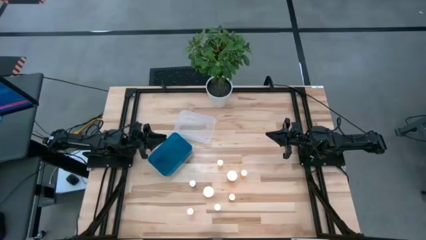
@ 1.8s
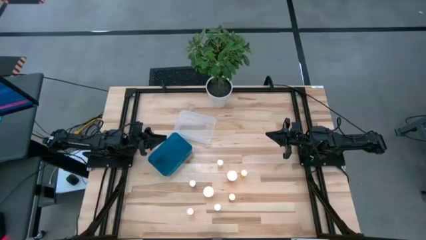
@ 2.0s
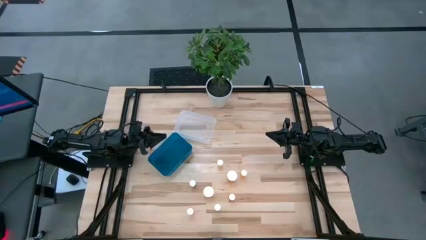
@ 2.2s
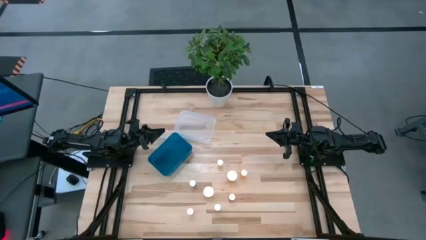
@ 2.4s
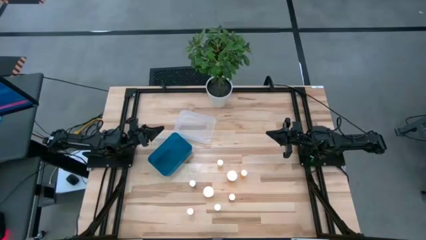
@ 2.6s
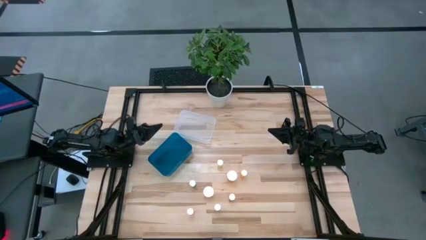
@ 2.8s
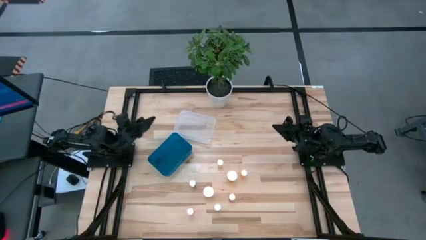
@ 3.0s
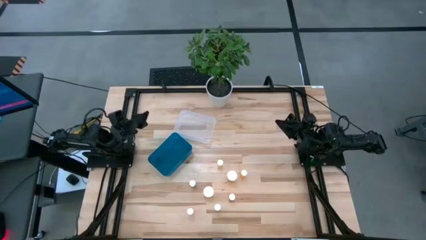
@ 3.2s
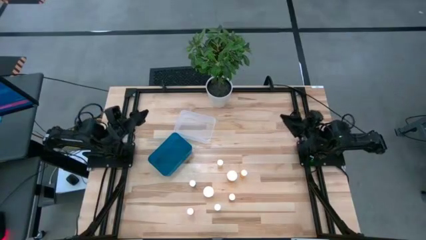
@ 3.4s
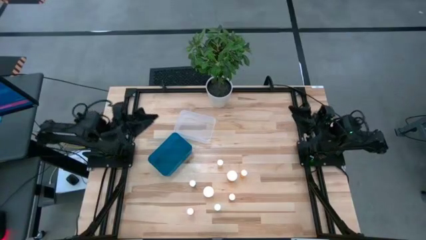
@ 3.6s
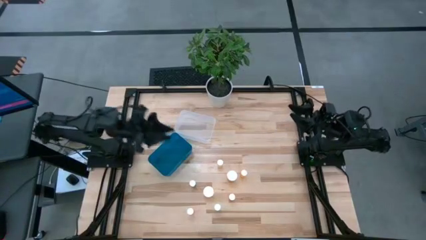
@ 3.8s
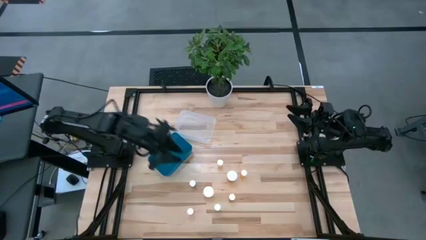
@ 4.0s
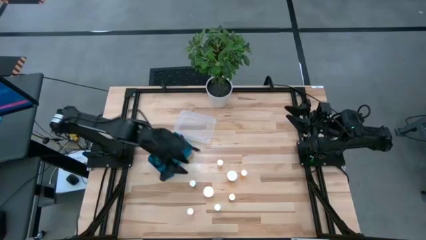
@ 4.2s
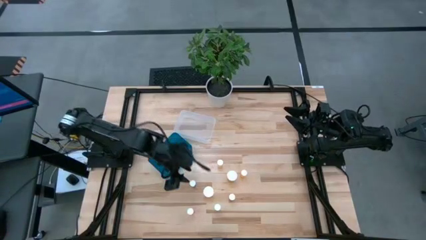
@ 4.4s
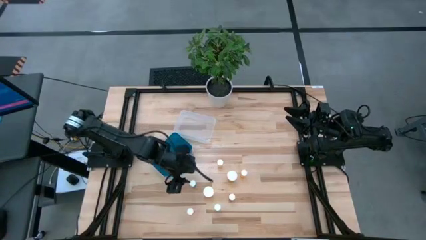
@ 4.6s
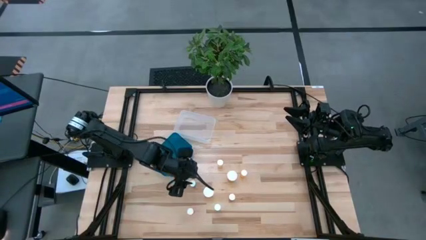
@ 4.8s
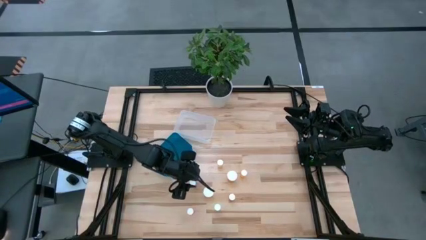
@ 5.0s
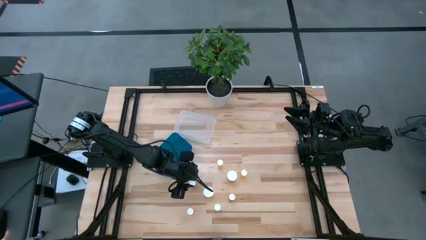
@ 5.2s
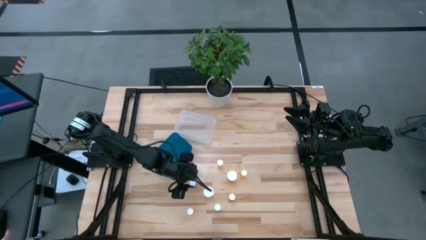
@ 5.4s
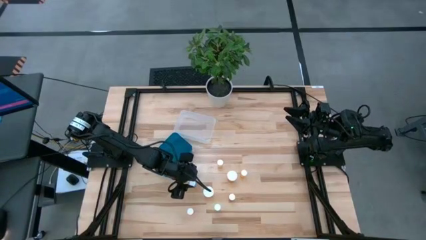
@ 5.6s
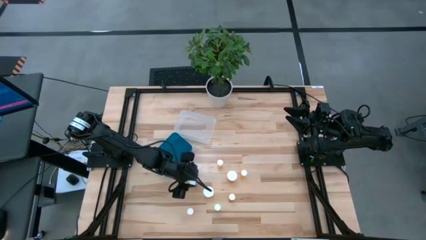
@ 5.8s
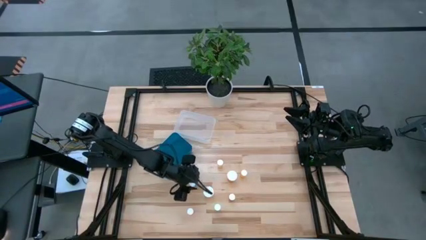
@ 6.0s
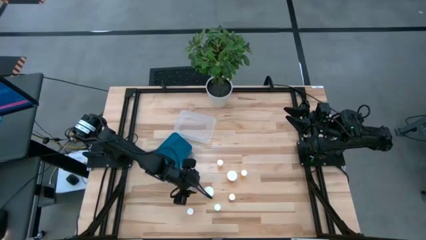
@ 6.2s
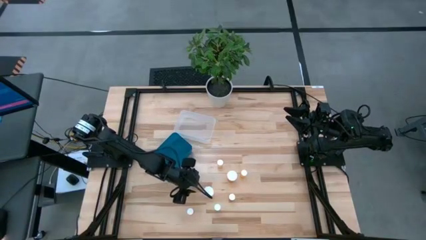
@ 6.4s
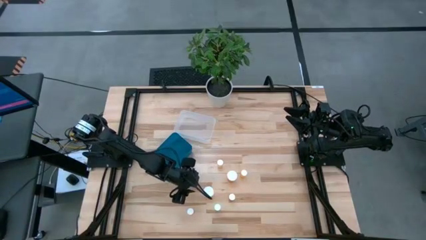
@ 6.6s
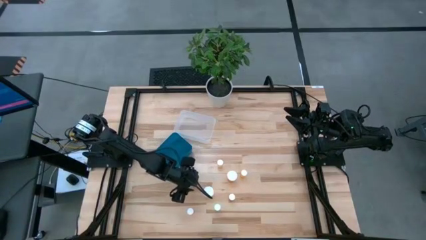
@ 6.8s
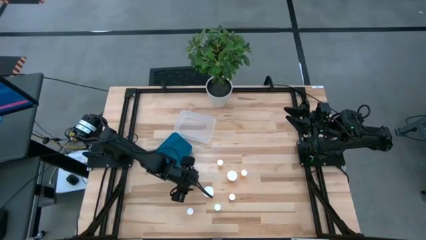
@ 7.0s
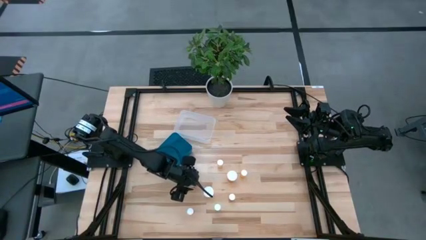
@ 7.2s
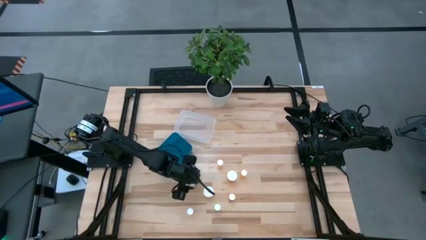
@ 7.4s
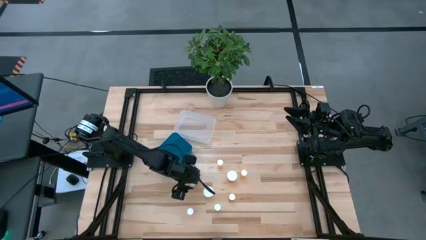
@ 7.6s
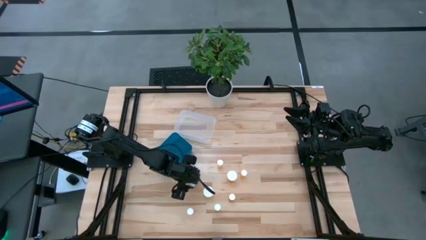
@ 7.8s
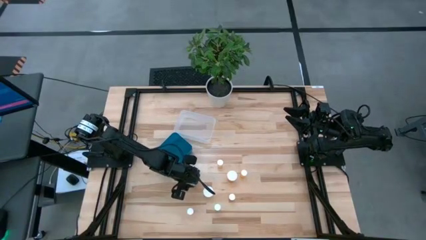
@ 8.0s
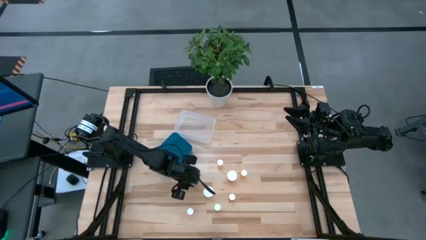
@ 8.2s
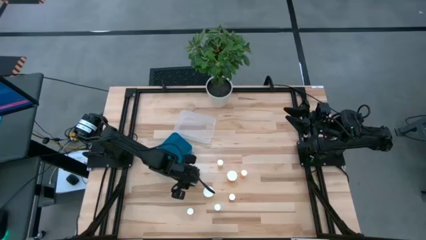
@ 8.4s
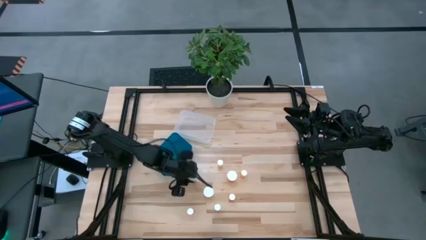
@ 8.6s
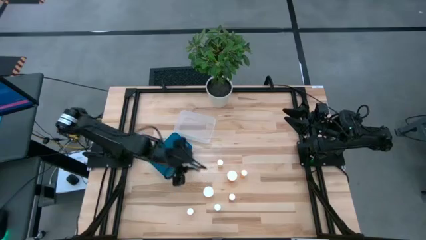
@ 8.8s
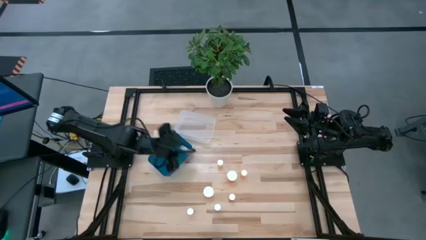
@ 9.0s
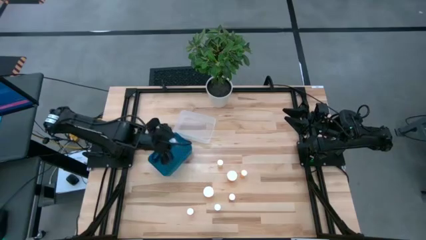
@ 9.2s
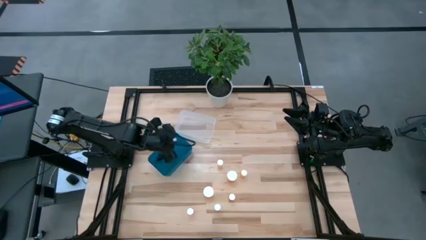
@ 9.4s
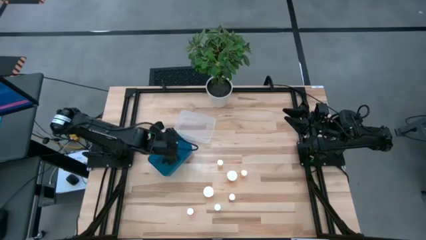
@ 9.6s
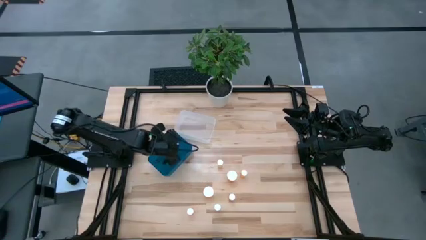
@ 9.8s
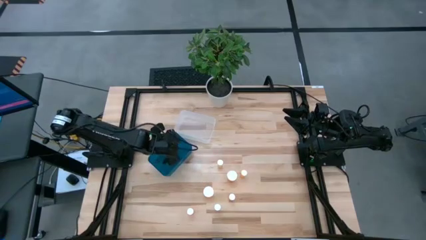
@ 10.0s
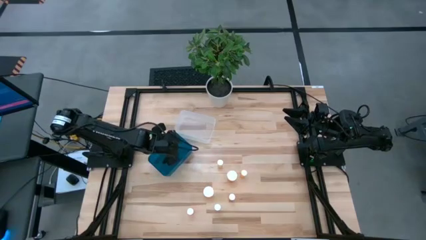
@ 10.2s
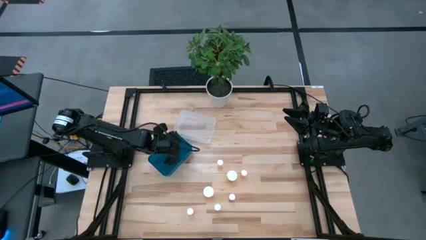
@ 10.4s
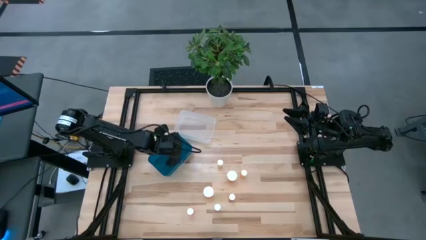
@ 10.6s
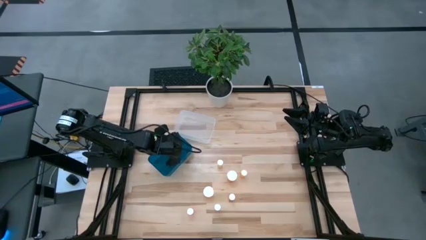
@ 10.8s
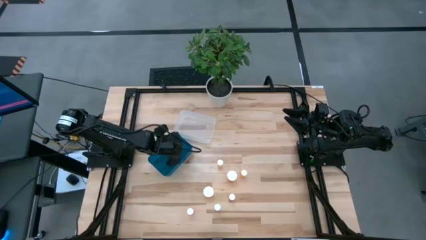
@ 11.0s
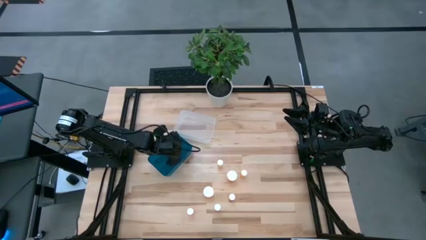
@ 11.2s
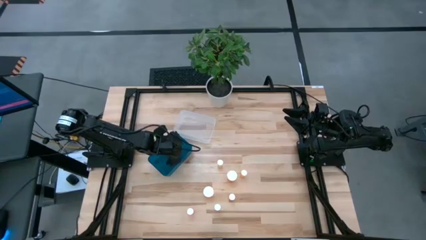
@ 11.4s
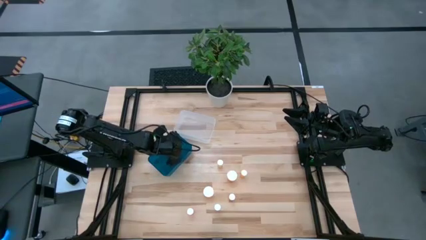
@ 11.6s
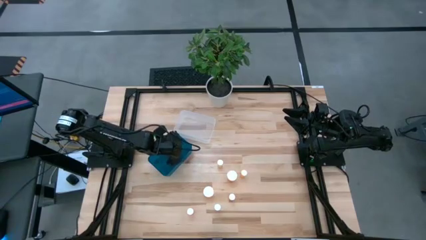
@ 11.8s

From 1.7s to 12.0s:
Task: Pick and place medicine bottles into bin by pill shape (circle, oval)
Put the blue pill bottle into the blue bin

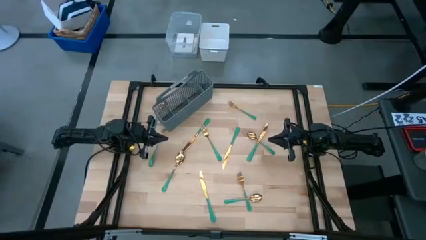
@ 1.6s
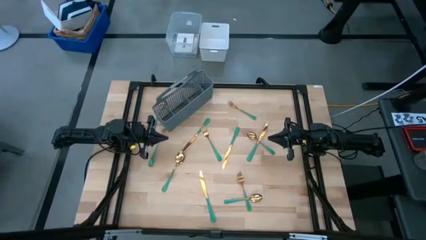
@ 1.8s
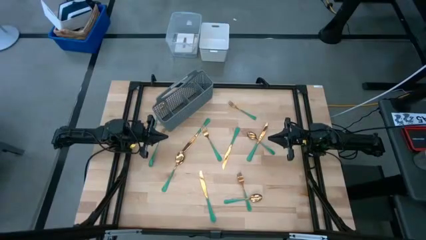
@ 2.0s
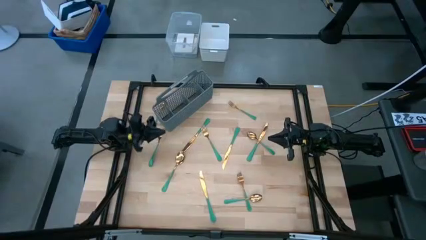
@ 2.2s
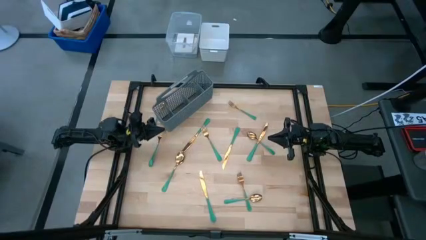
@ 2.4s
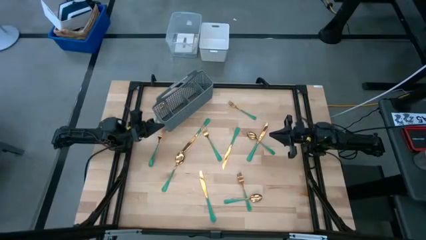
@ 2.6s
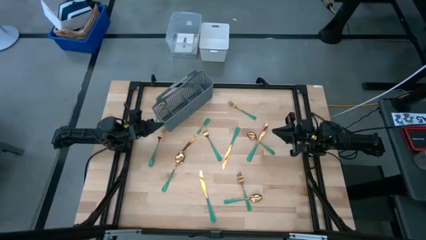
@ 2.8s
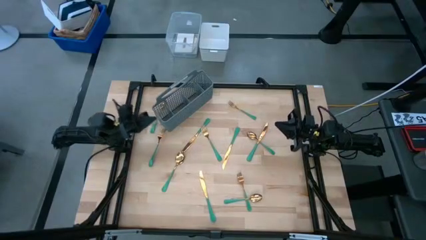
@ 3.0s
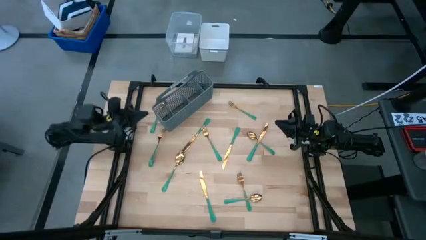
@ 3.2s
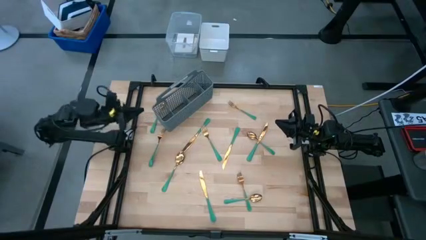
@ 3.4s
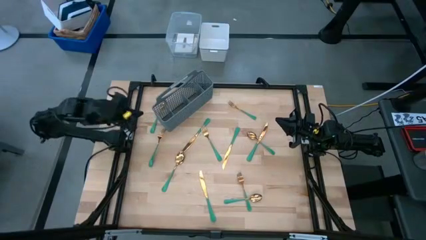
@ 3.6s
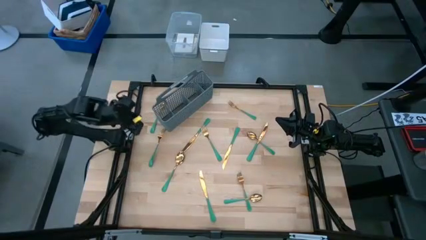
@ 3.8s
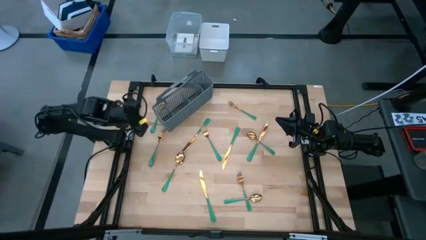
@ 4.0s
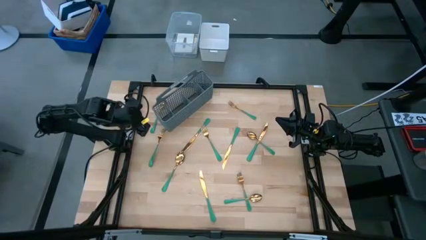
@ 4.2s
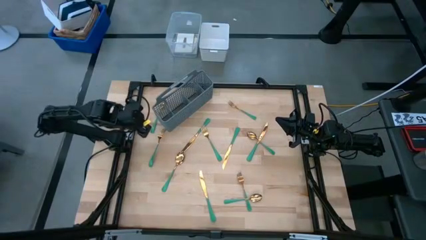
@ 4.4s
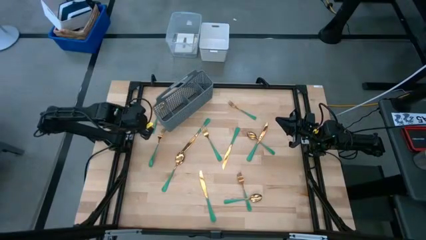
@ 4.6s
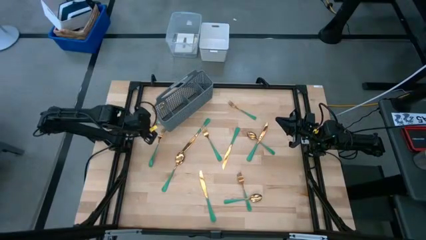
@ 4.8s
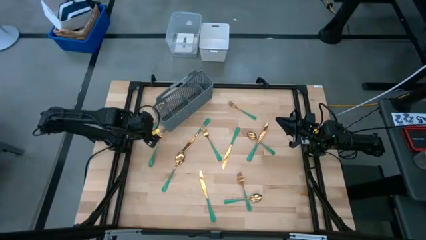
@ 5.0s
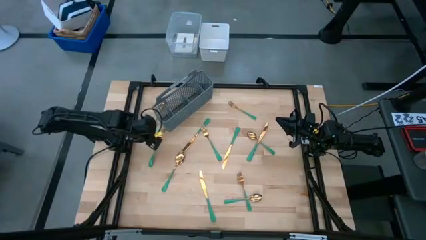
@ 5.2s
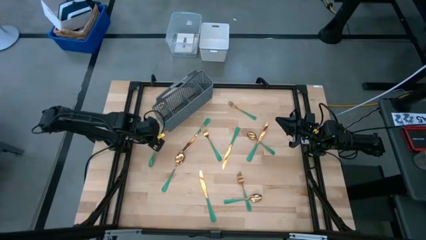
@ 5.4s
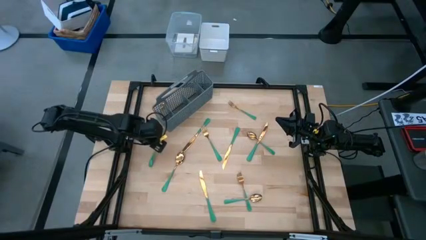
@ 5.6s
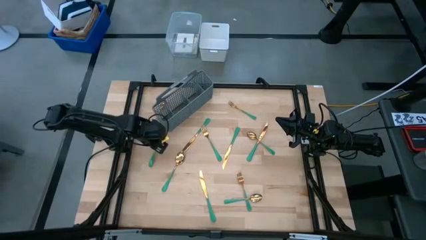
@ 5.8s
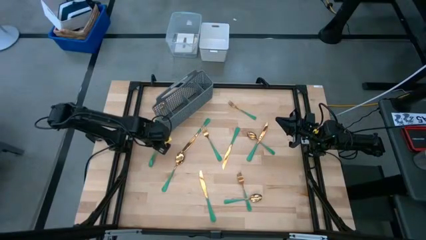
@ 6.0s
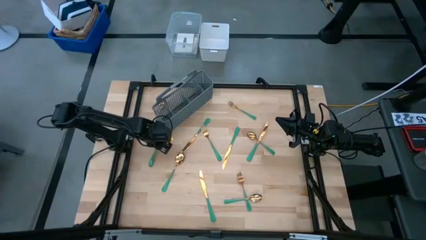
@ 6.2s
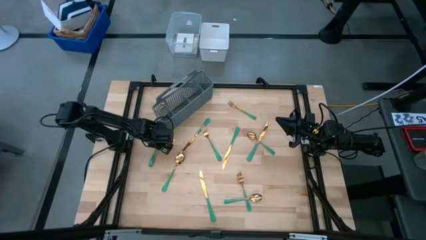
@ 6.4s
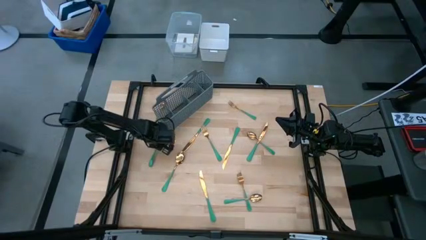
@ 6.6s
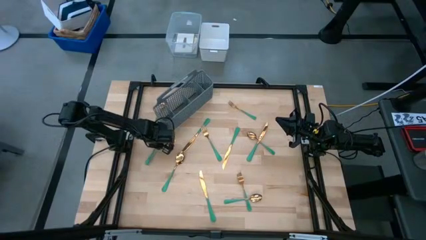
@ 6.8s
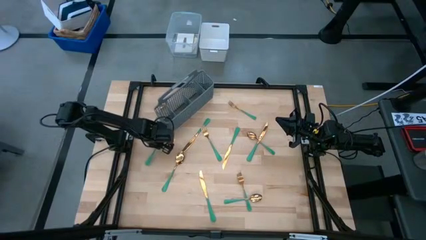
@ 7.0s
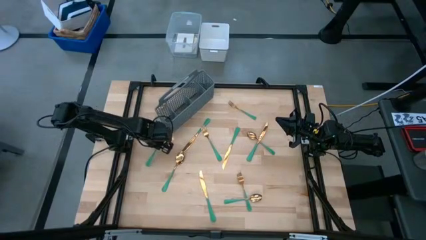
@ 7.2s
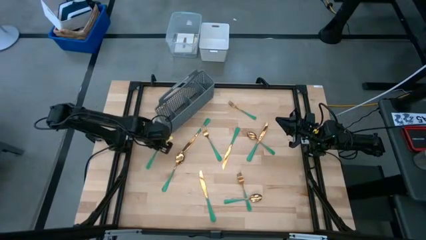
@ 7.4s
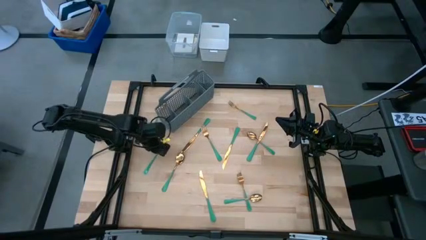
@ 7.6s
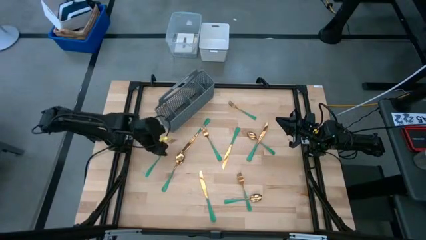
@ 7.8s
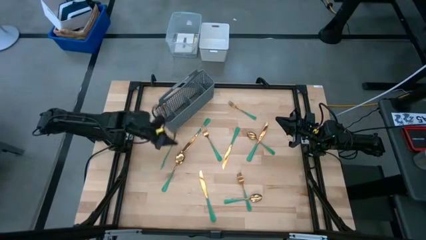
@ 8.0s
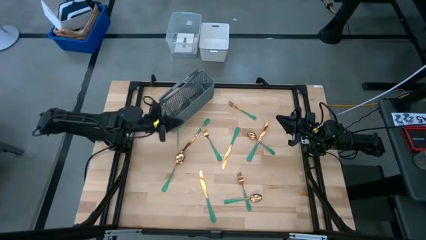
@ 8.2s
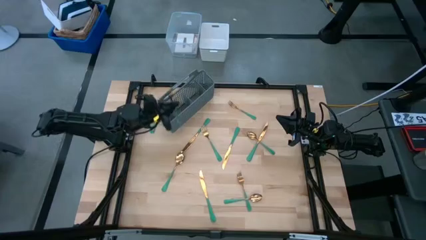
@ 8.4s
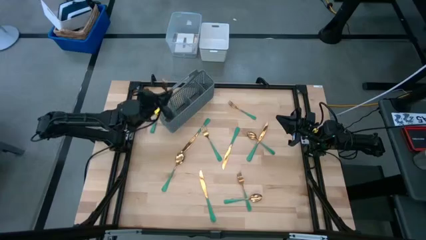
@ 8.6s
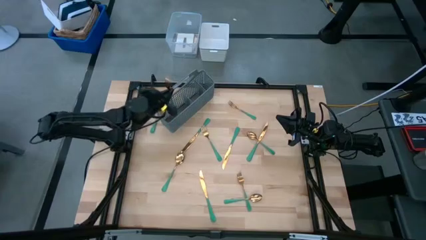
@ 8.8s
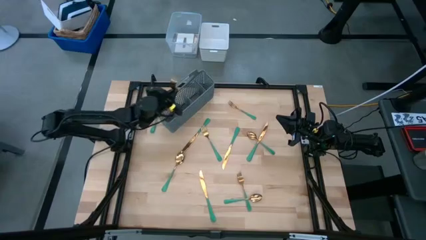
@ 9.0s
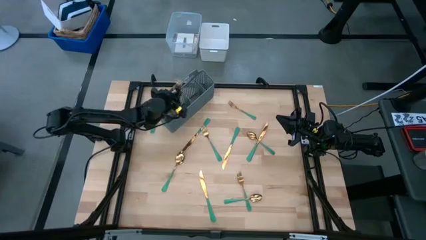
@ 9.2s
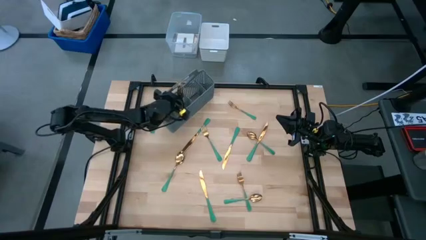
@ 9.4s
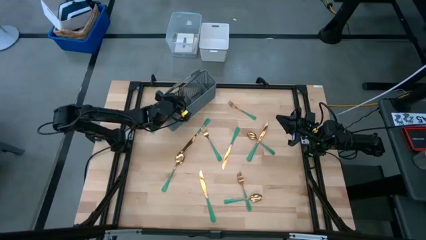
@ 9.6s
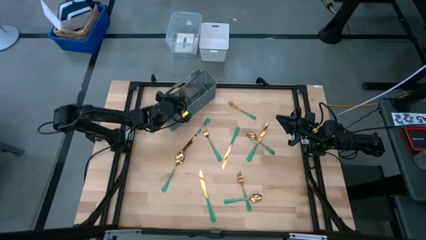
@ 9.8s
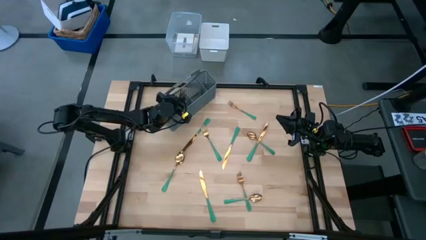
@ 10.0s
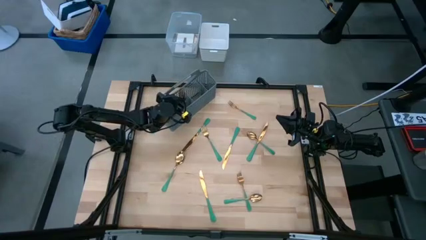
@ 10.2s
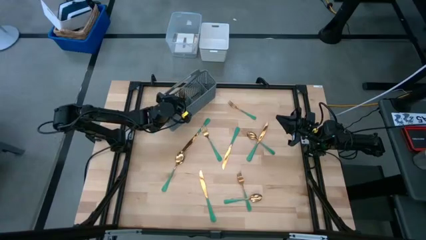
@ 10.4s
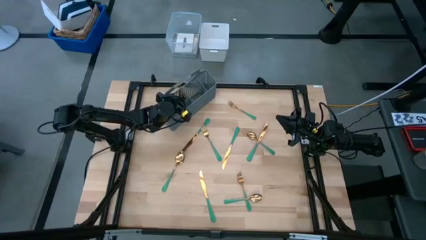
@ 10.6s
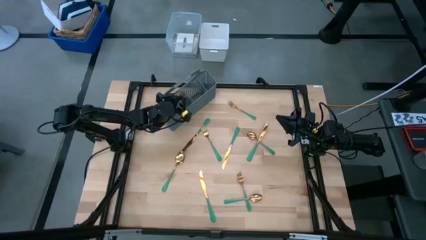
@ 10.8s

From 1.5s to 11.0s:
Task: Sort silverware
Put the middle left green-gold fork into the silverware basket
